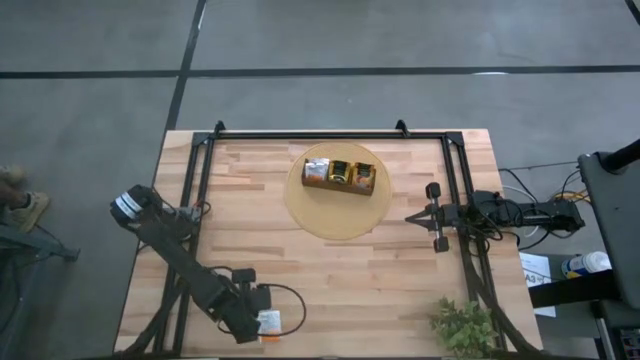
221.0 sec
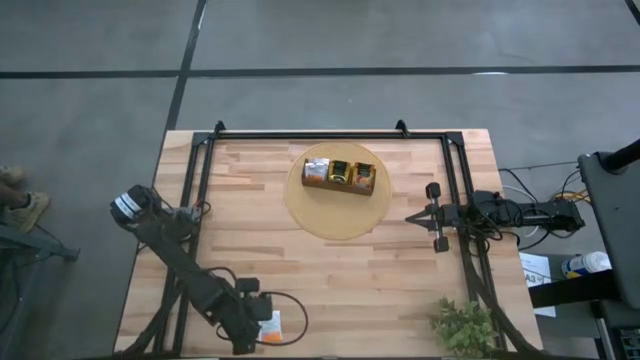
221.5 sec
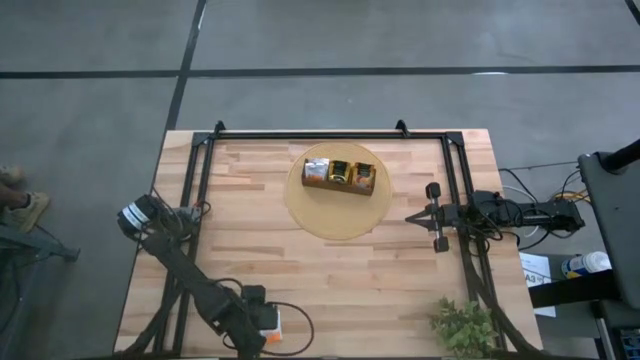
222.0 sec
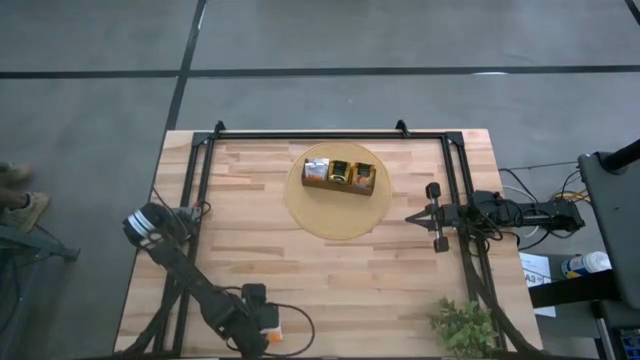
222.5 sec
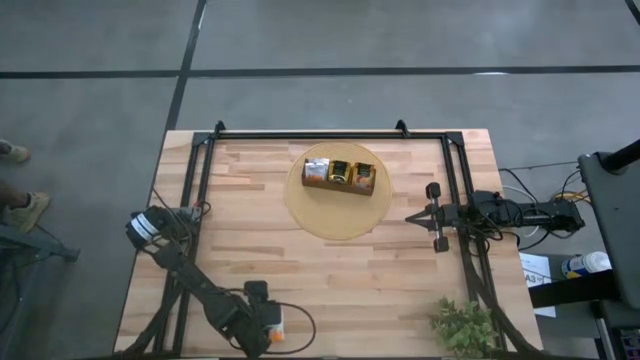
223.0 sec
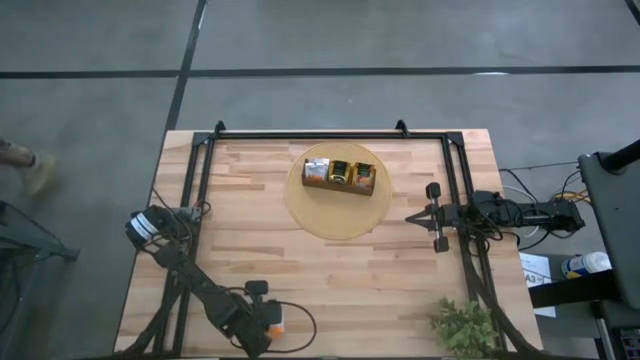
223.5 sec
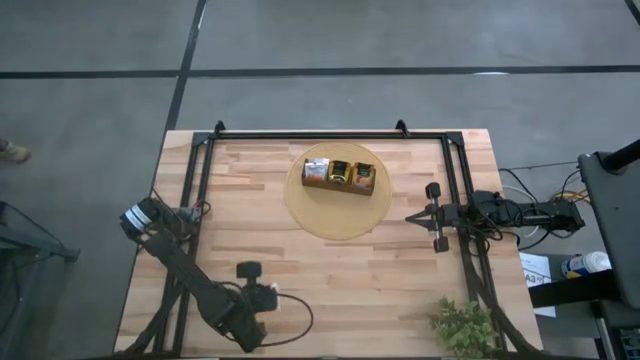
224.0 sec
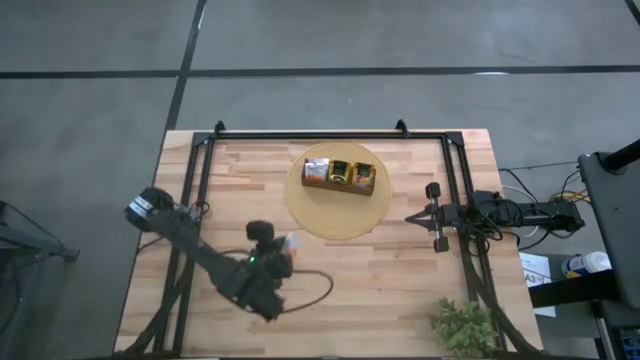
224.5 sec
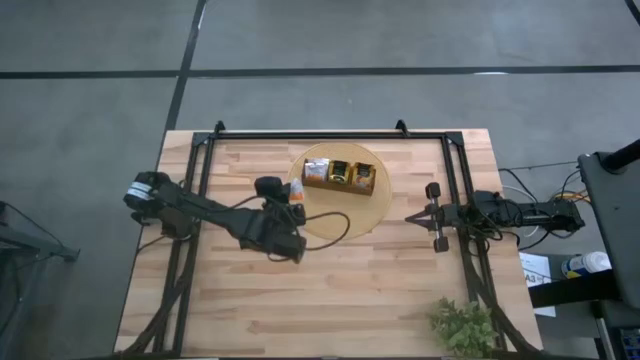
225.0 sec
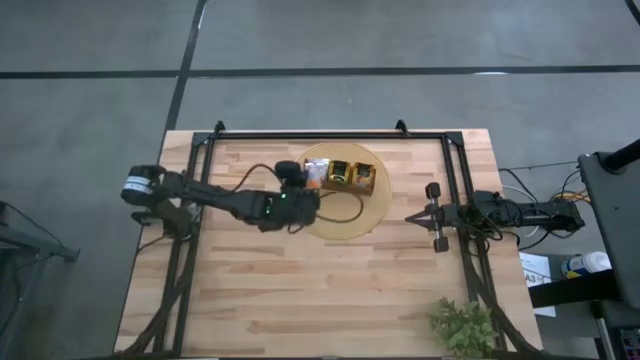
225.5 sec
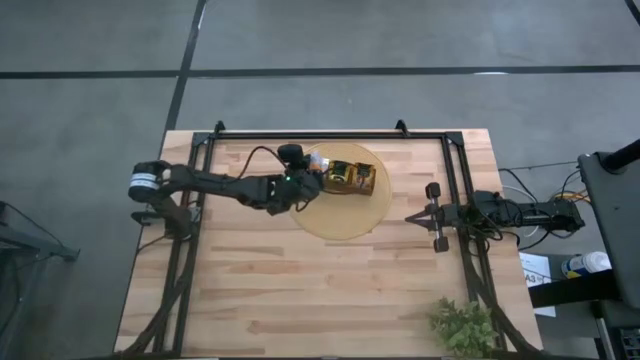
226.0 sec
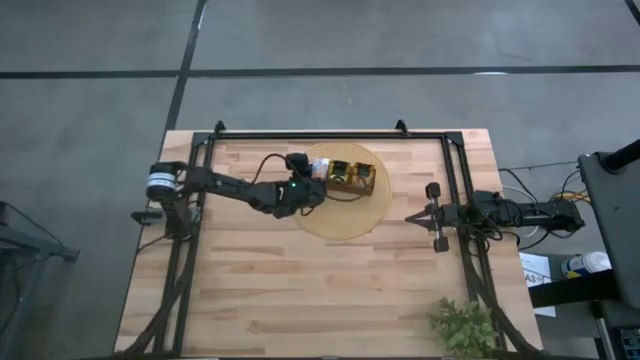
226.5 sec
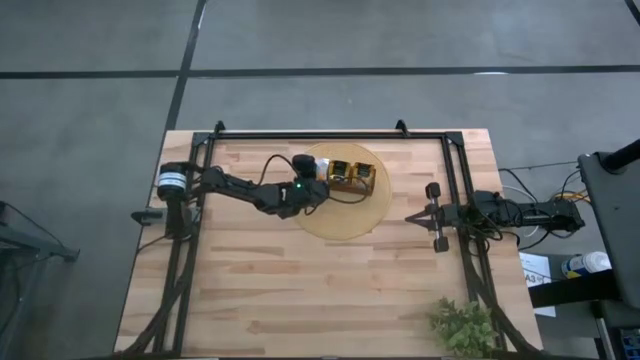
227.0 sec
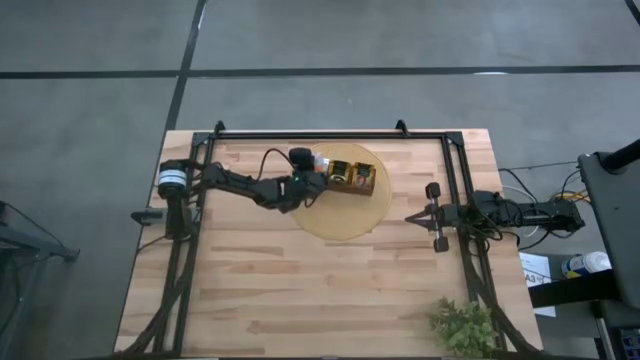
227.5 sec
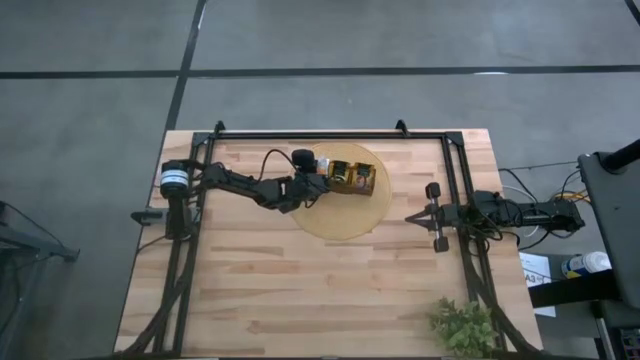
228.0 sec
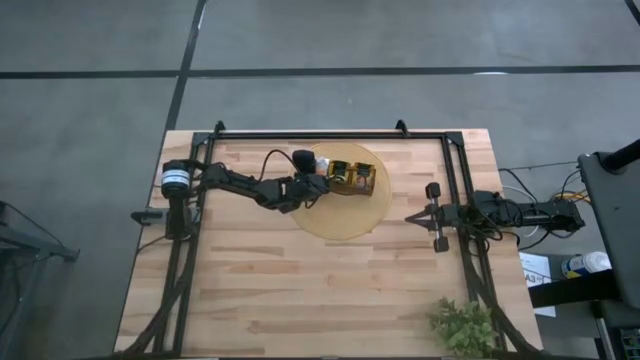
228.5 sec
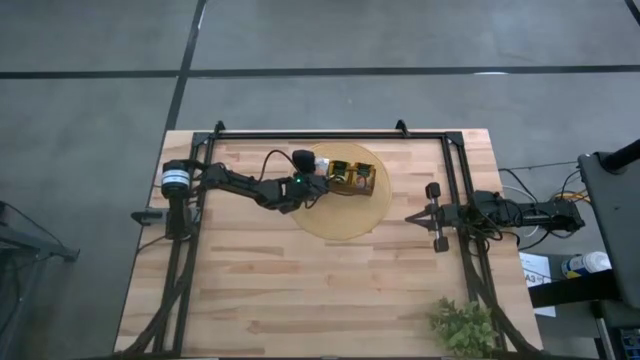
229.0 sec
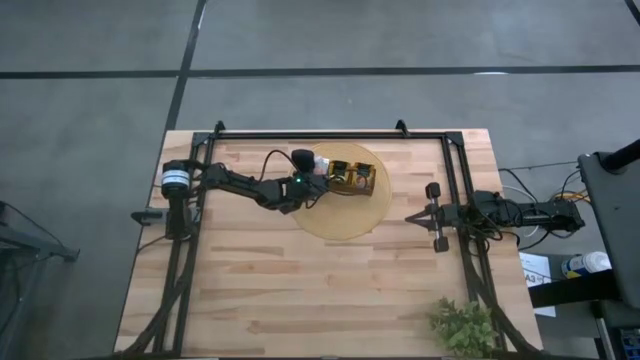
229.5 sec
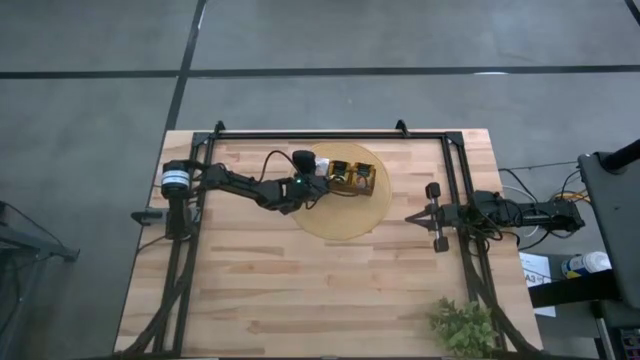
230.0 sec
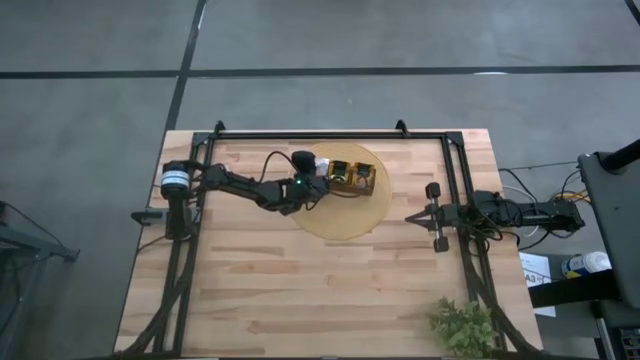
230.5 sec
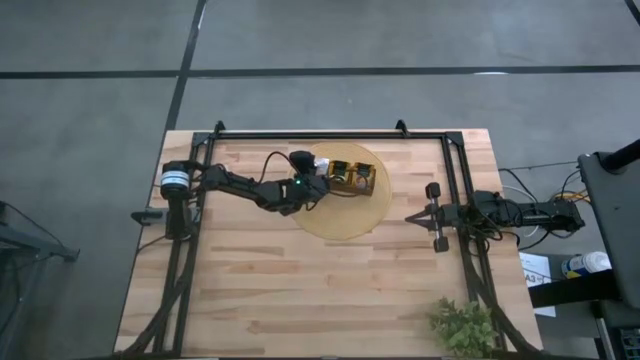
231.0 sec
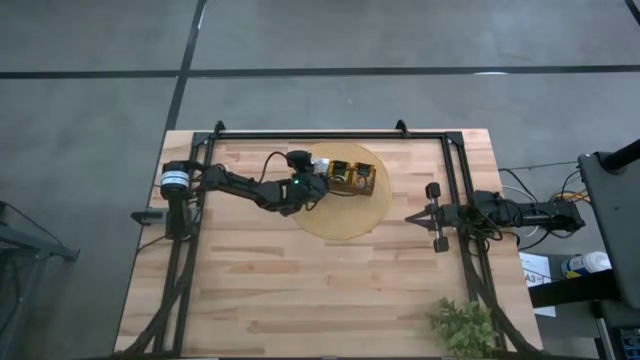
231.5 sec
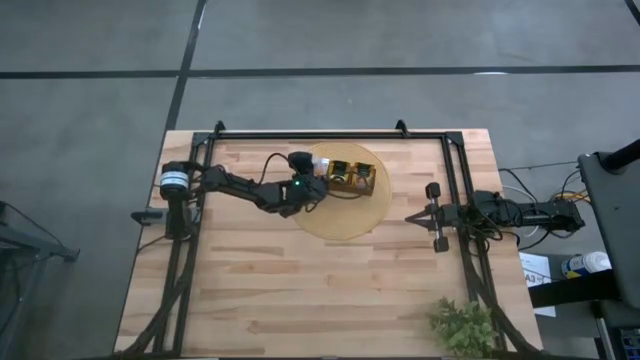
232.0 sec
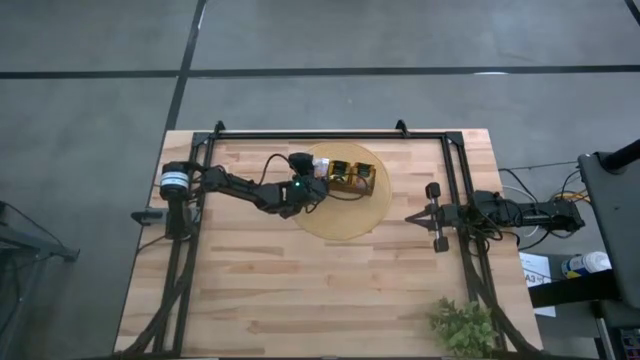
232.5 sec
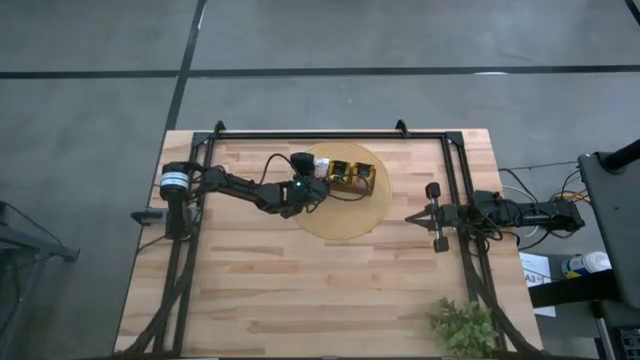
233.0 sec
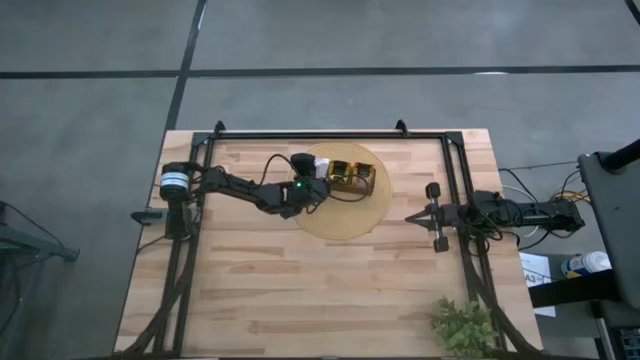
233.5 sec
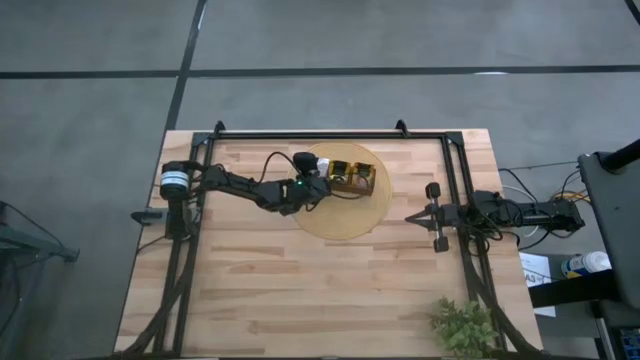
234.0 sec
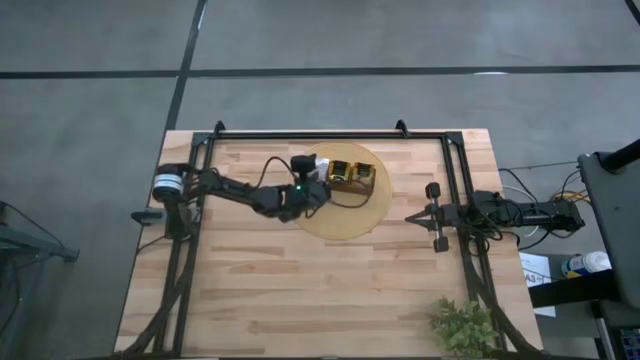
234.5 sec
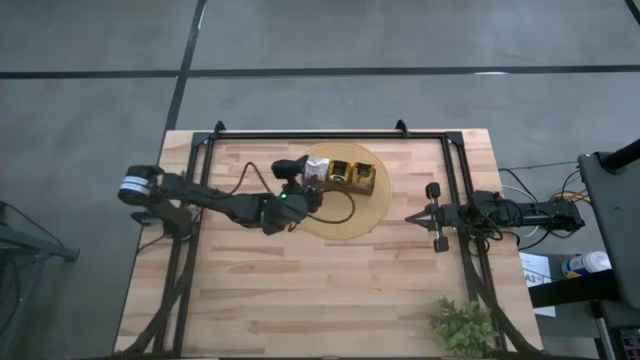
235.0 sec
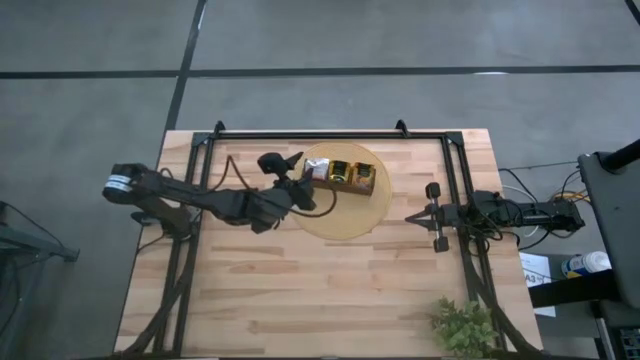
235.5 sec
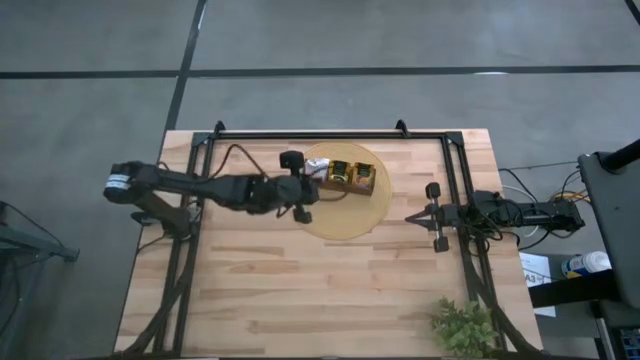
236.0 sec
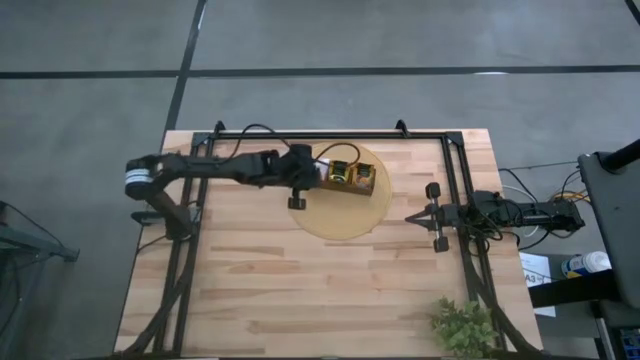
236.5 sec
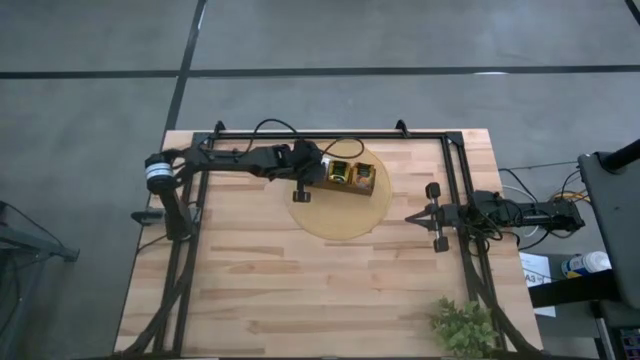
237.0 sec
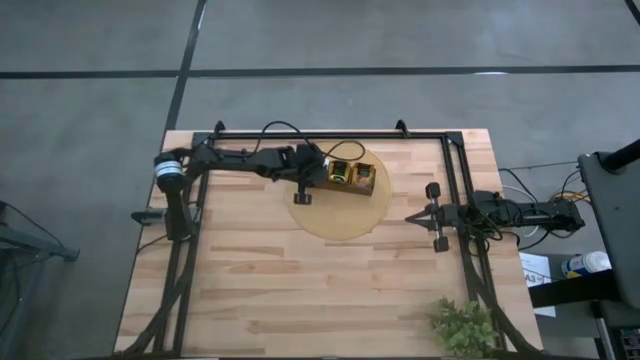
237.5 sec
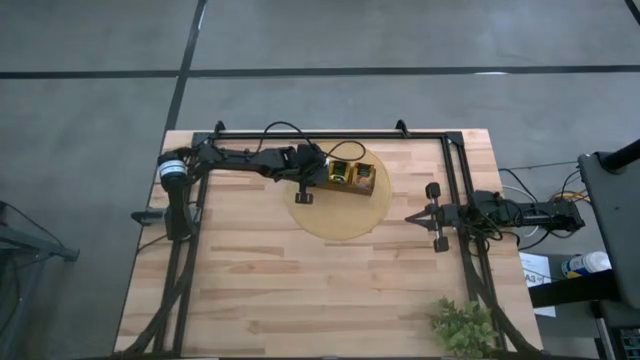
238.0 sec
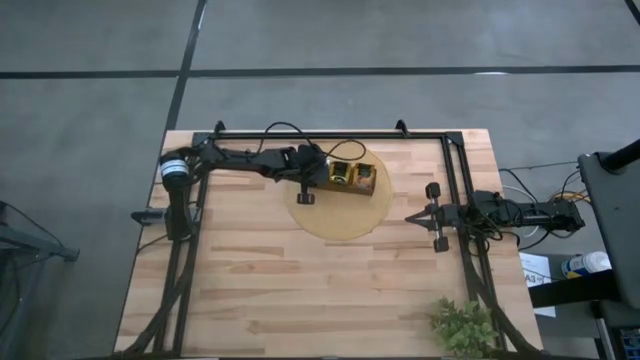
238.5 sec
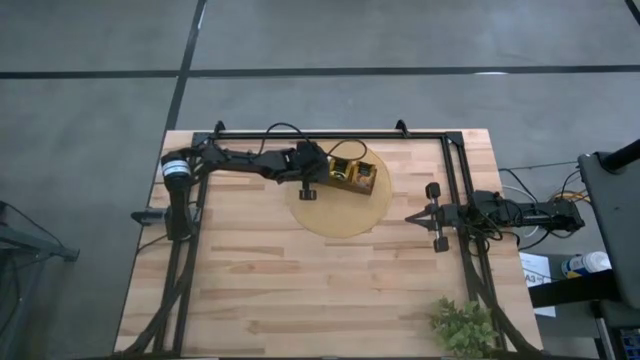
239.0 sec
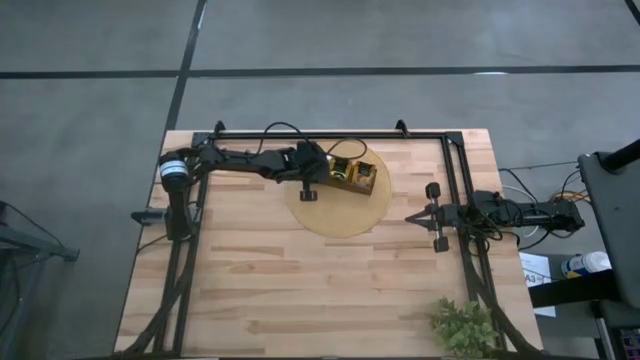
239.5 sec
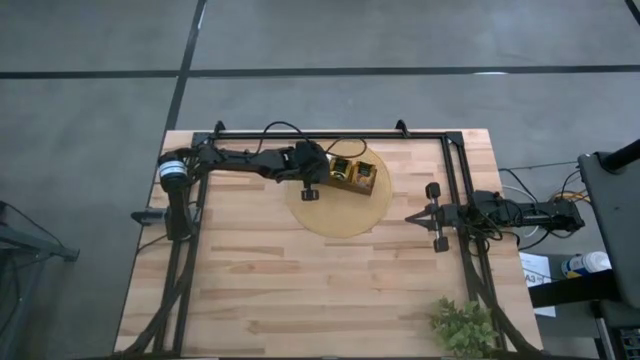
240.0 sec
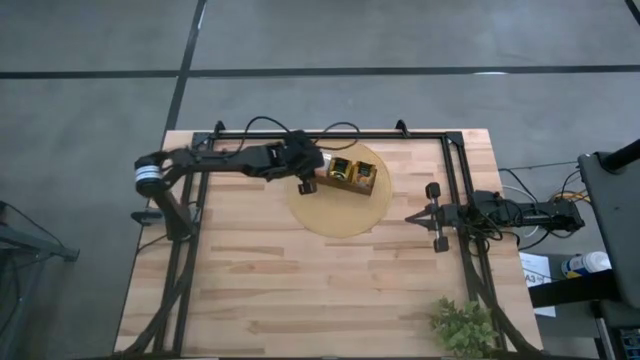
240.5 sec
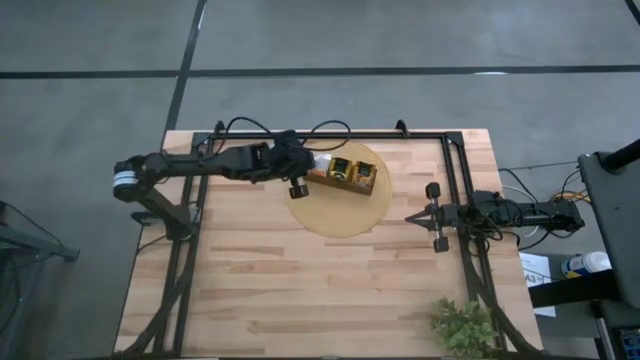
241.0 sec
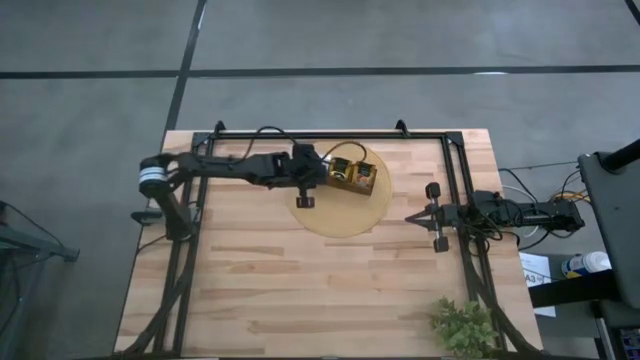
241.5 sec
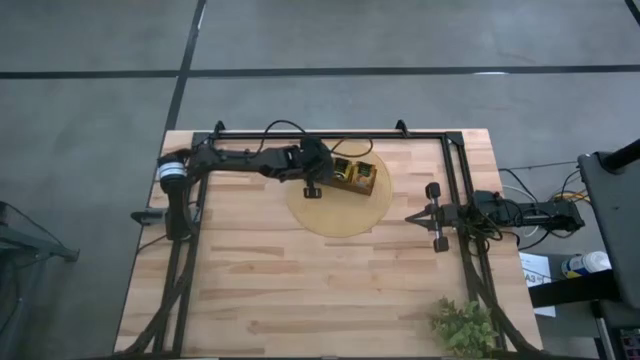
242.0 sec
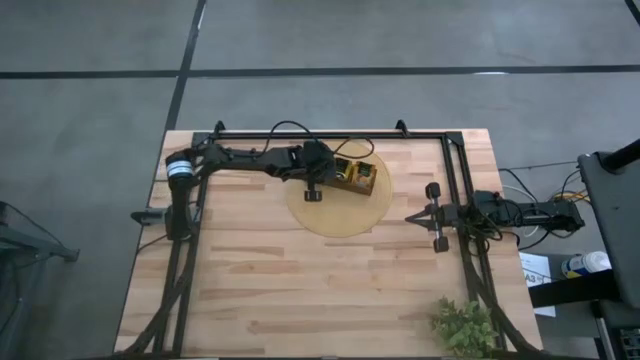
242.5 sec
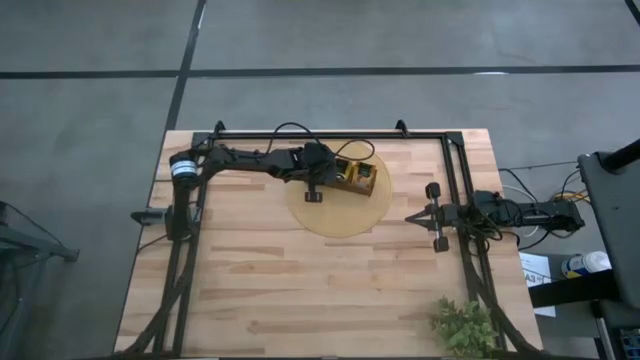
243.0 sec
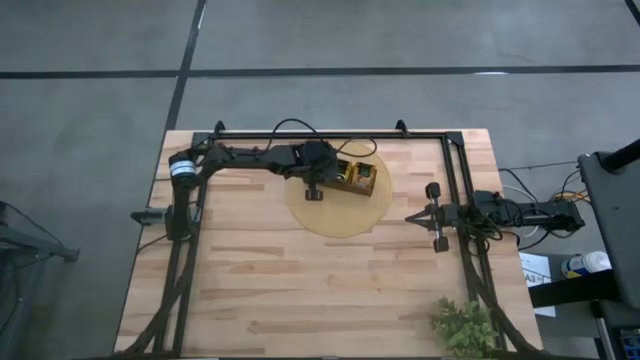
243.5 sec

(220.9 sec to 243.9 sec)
Task: Pick & Place Tea
Put the white tea bag into the left section of wooden organizer
